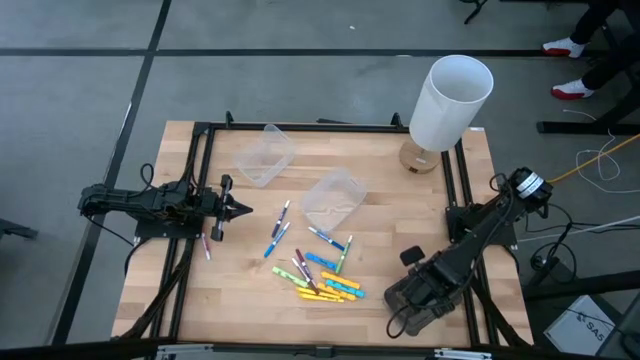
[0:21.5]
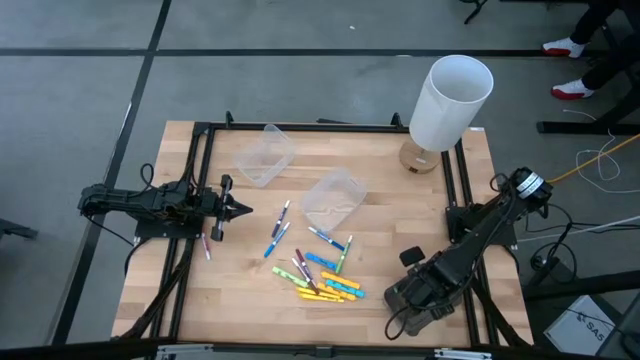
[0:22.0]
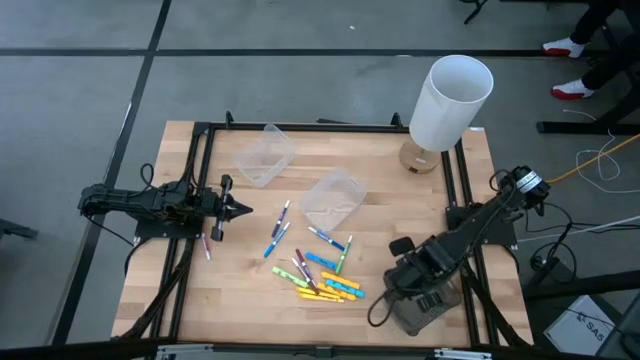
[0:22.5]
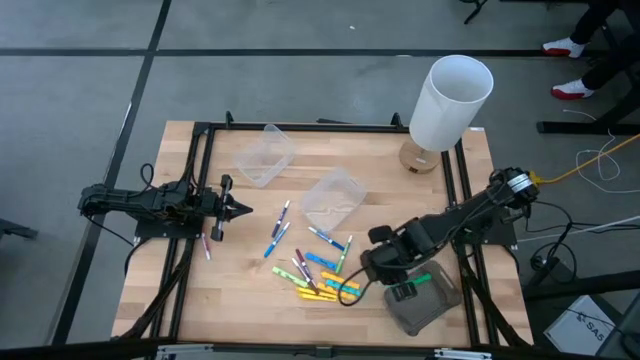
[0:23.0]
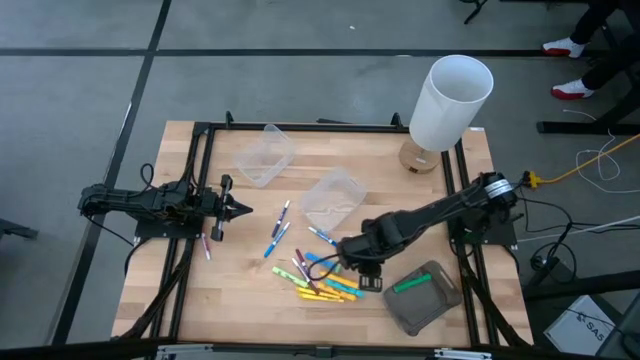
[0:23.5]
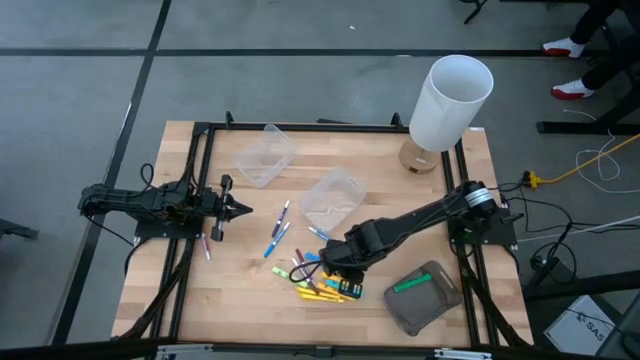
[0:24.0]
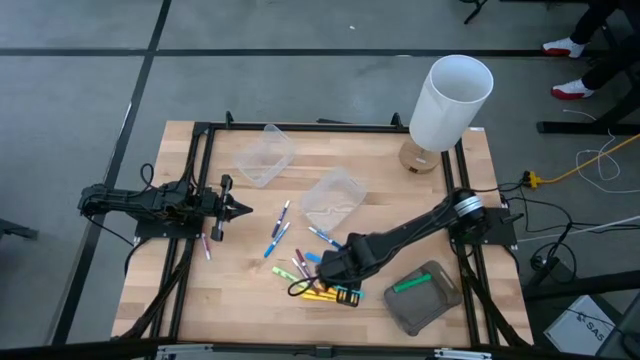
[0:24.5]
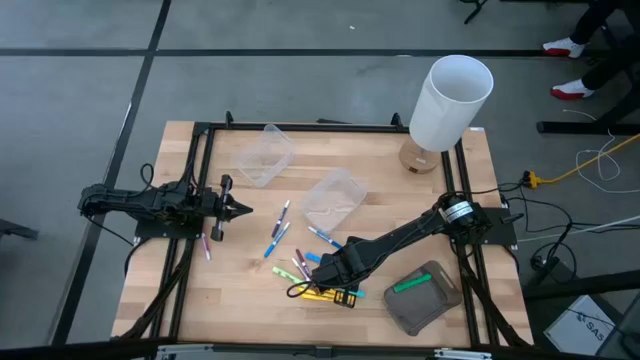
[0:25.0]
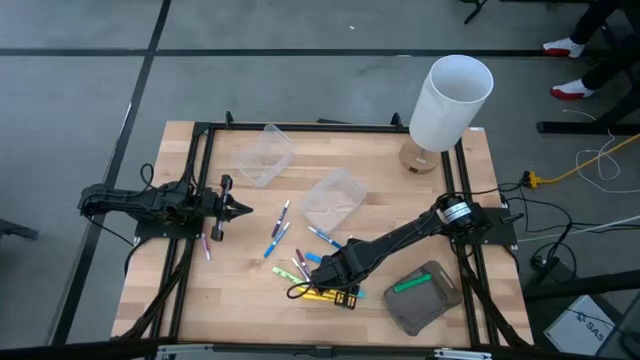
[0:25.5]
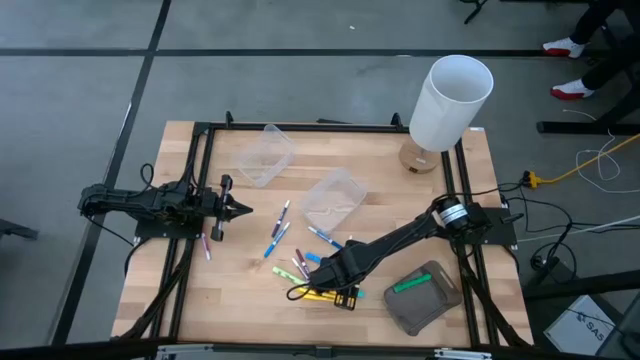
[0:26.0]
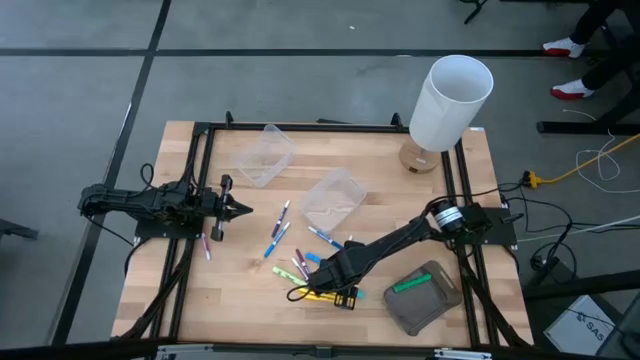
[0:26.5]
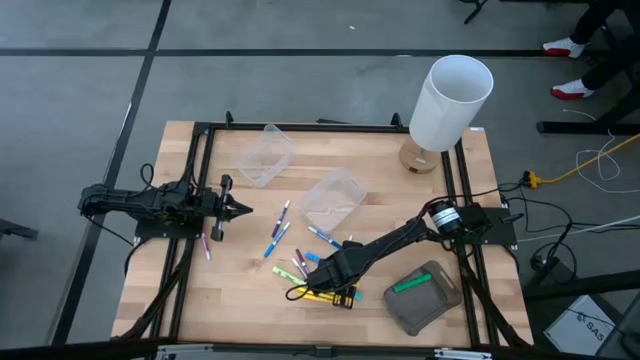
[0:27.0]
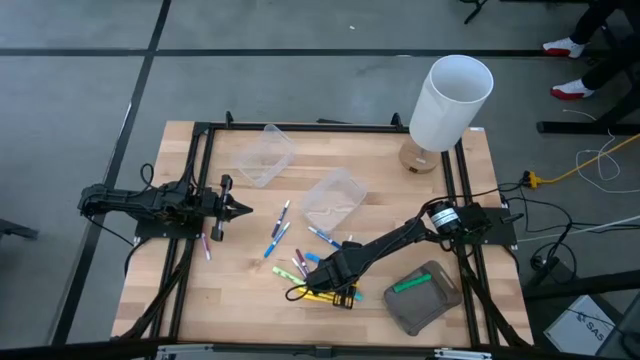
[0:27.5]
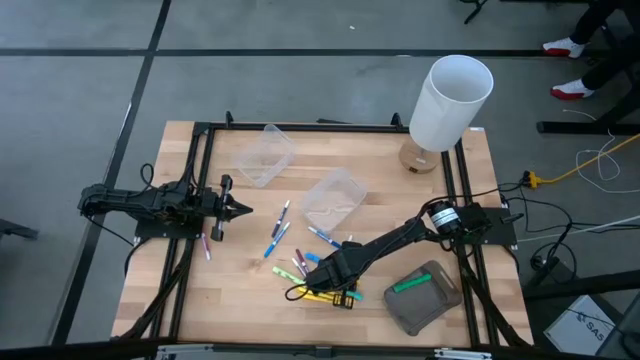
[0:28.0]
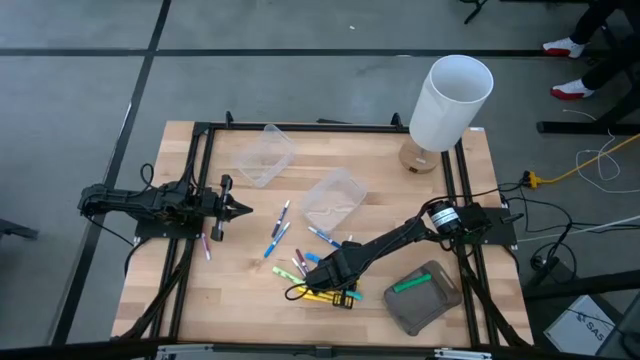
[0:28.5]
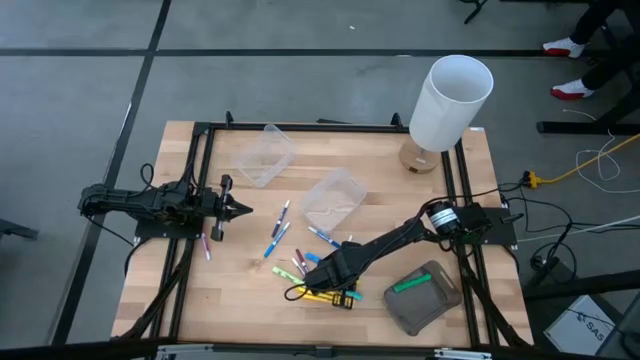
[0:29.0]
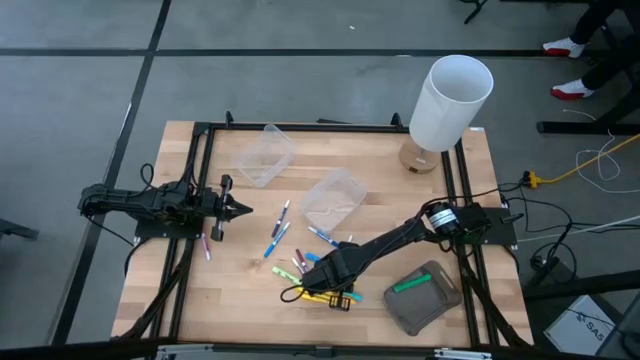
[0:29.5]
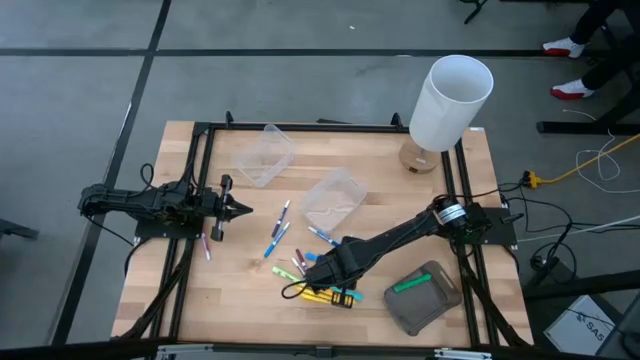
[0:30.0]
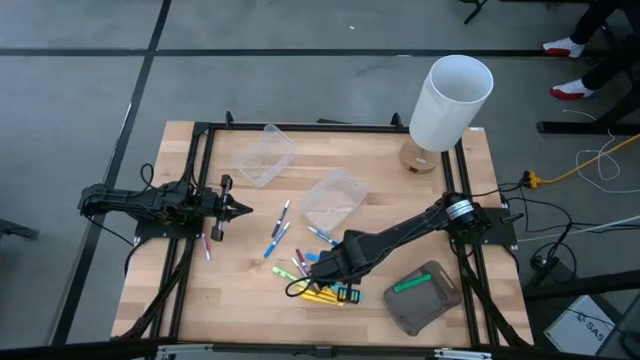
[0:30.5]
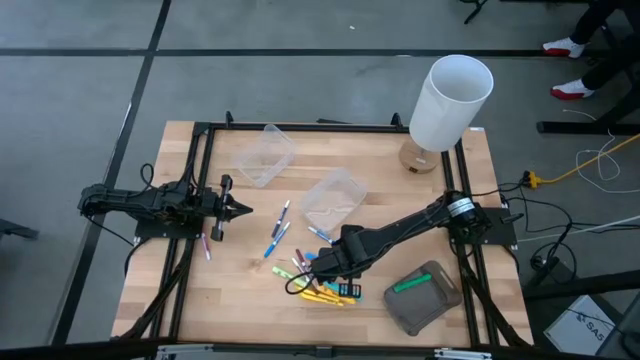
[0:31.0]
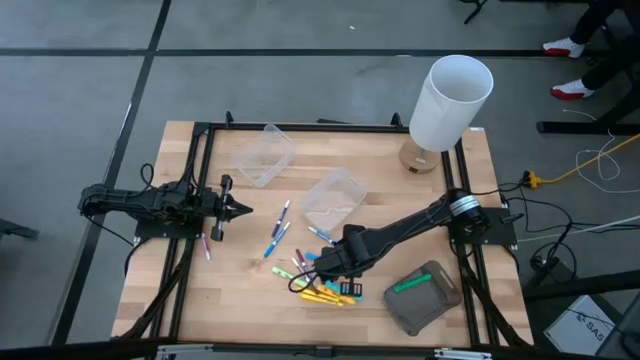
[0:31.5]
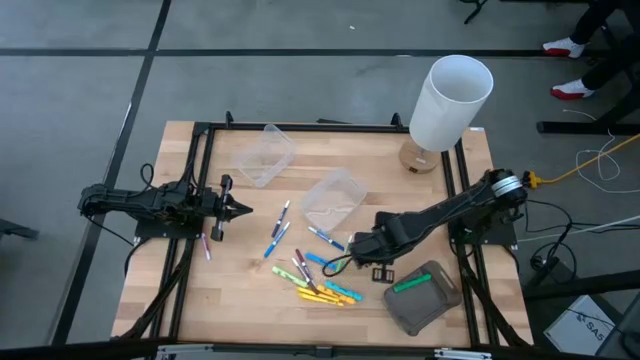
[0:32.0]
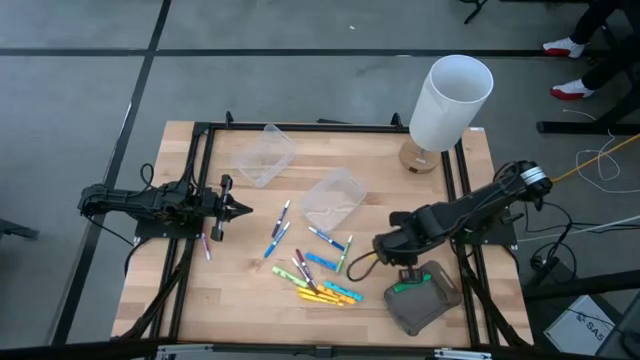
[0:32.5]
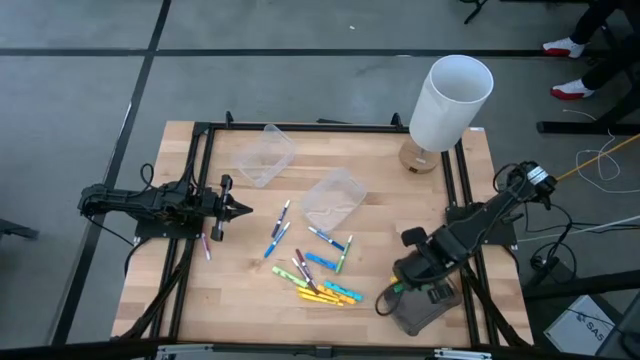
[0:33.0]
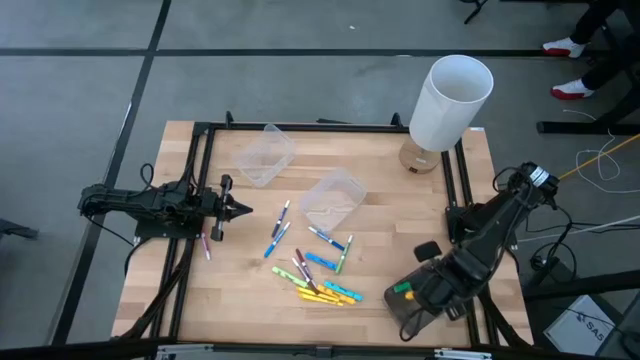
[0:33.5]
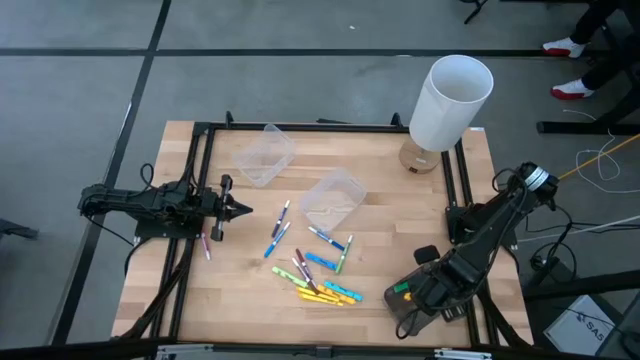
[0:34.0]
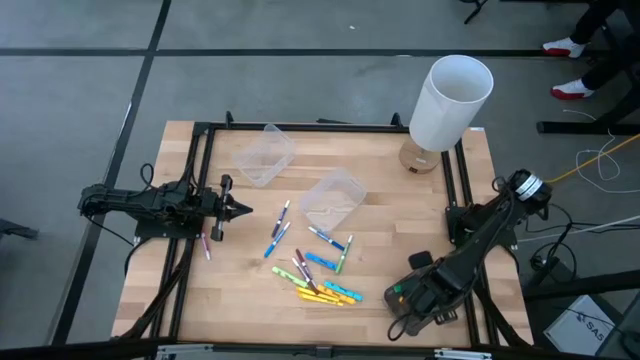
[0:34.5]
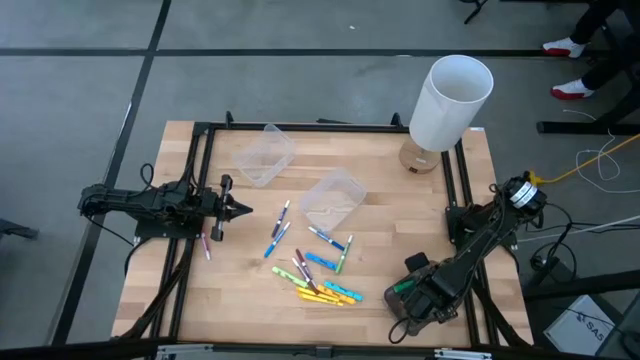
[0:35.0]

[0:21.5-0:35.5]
Task: Pick & Place Markers
Put the top yellow highlighter into the black bin

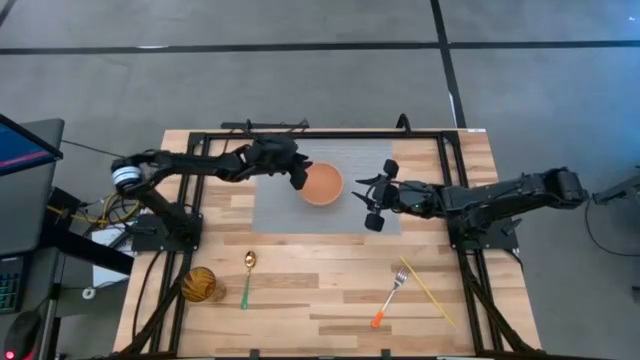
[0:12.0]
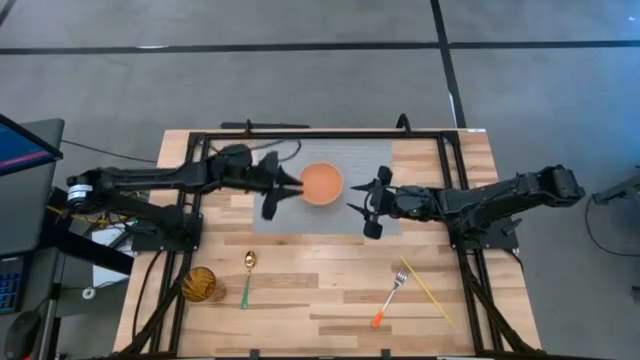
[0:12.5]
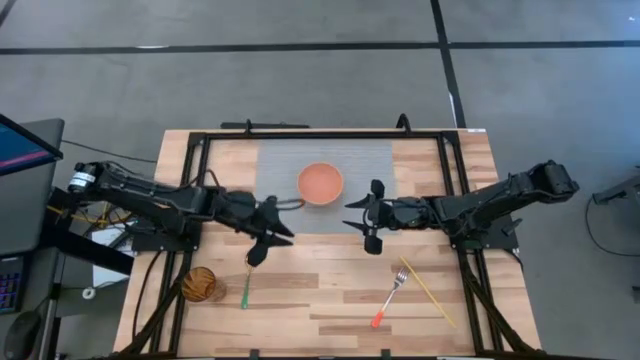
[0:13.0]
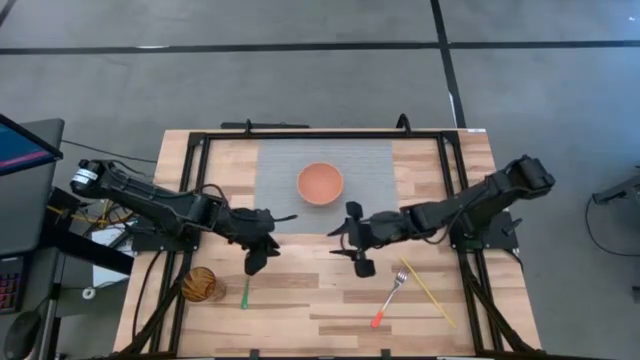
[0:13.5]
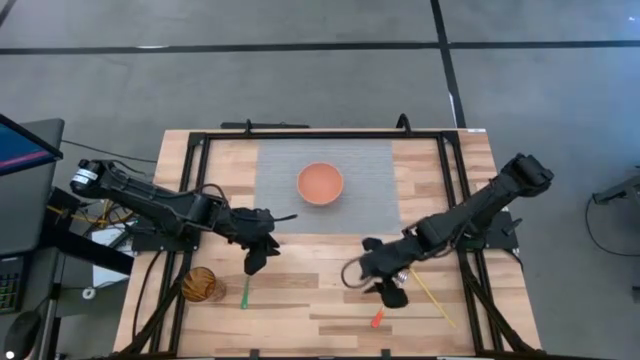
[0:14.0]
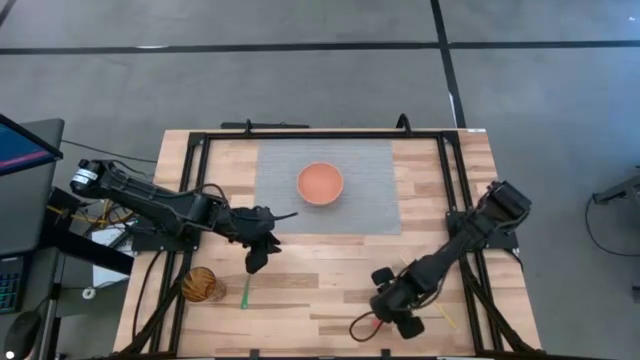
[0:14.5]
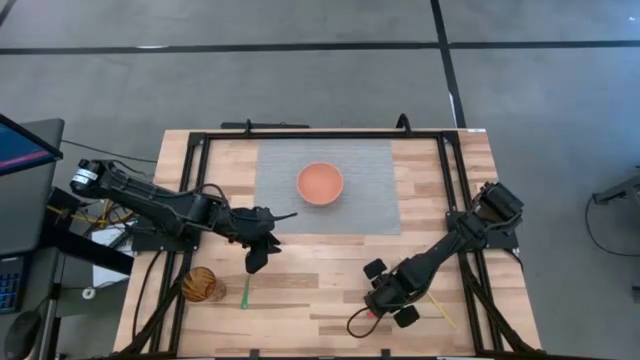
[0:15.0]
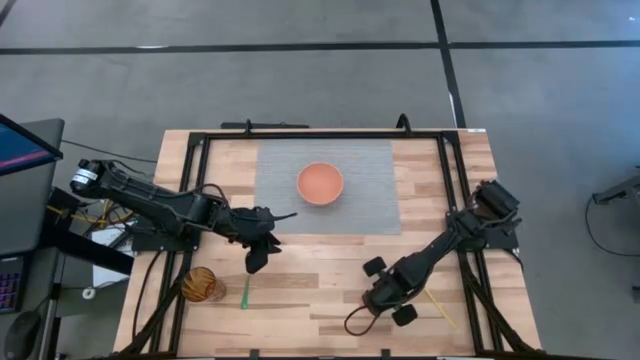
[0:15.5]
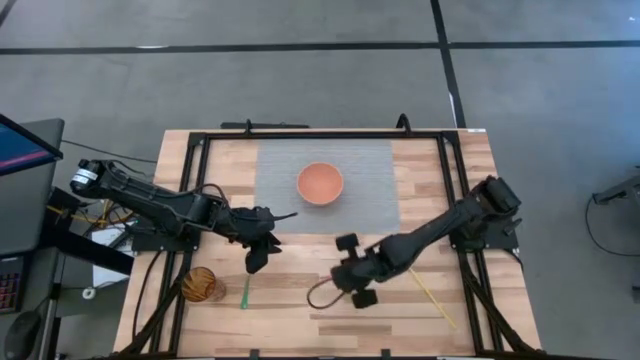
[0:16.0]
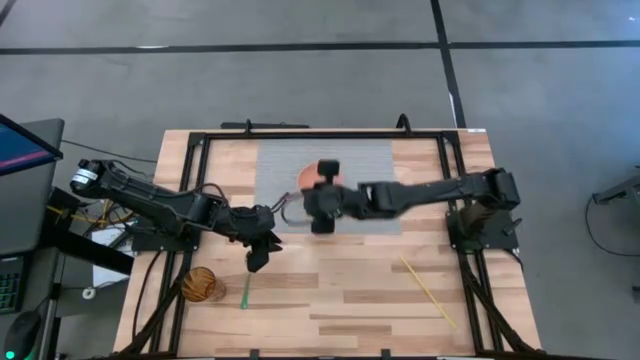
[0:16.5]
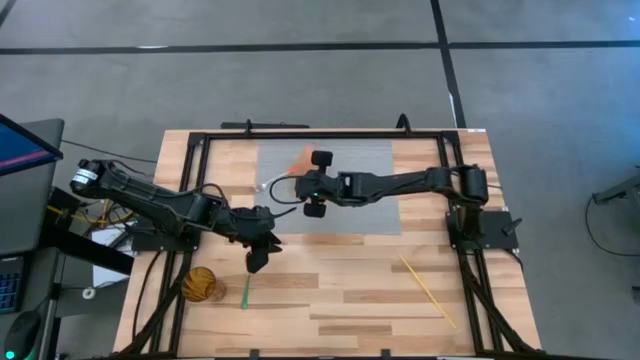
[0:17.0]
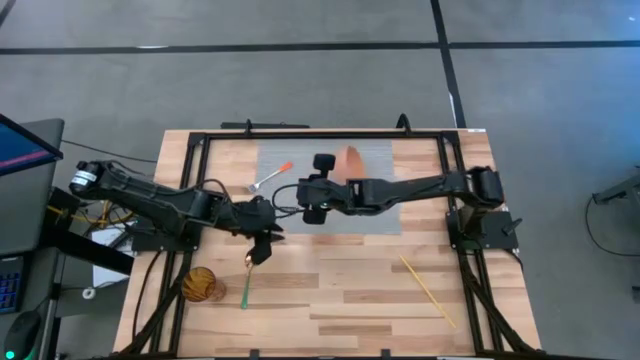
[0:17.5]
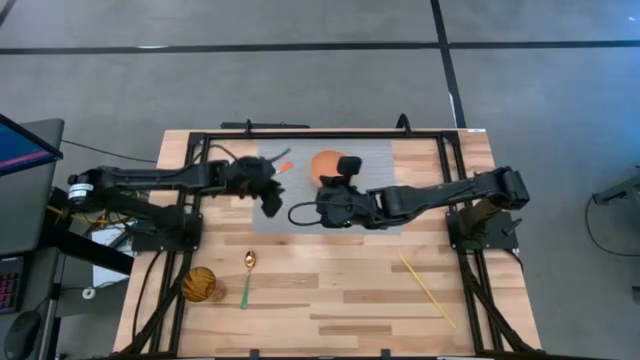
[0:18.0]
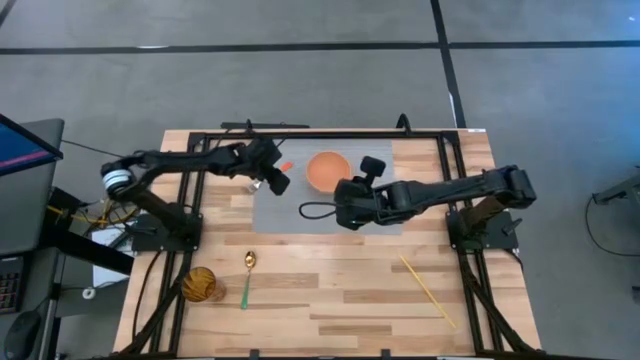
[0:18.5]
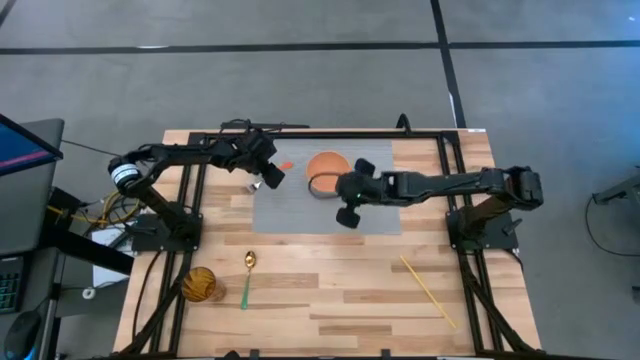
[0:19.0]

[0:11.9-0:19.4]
Task: Pick & Place Utensil
Put the orange fork into the brown bowl
